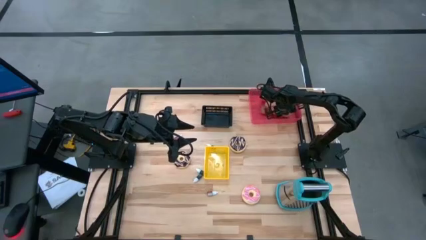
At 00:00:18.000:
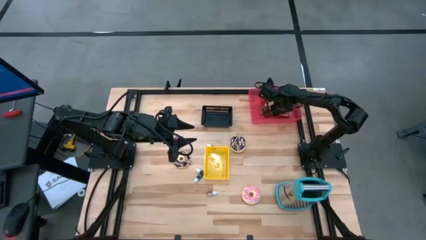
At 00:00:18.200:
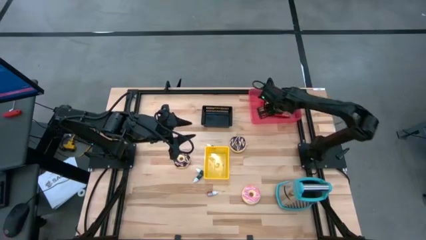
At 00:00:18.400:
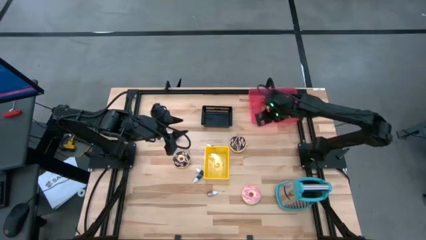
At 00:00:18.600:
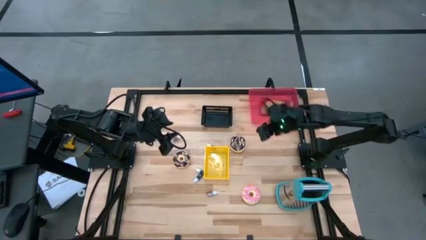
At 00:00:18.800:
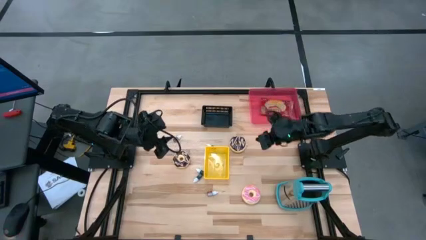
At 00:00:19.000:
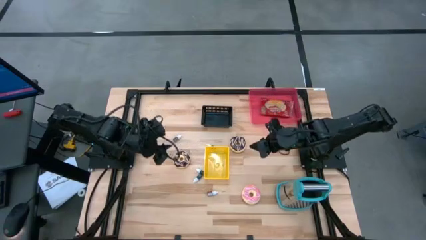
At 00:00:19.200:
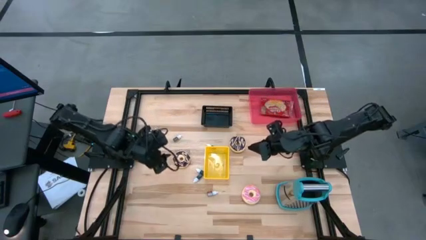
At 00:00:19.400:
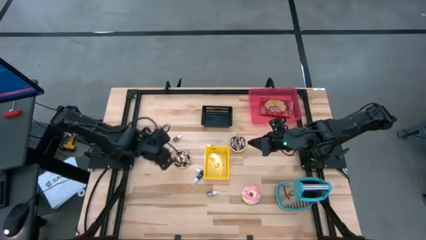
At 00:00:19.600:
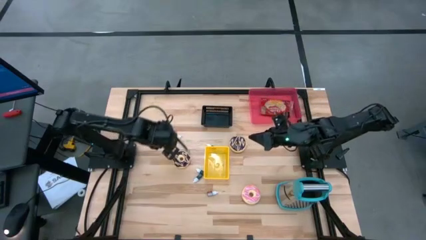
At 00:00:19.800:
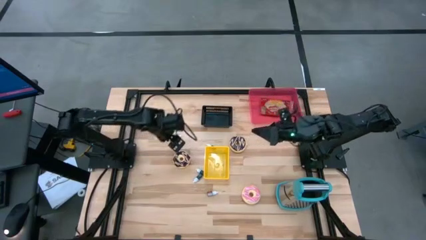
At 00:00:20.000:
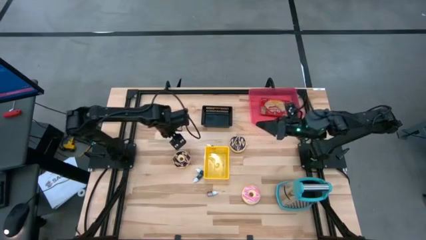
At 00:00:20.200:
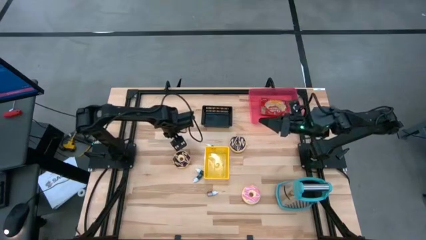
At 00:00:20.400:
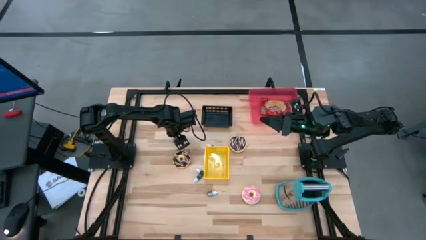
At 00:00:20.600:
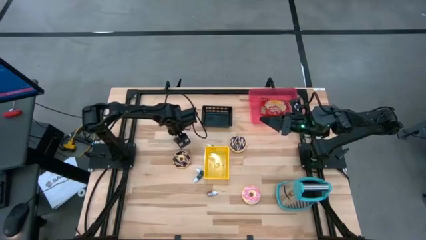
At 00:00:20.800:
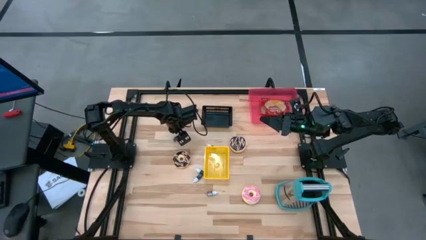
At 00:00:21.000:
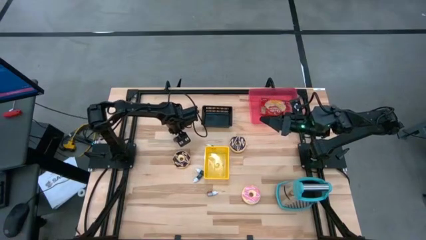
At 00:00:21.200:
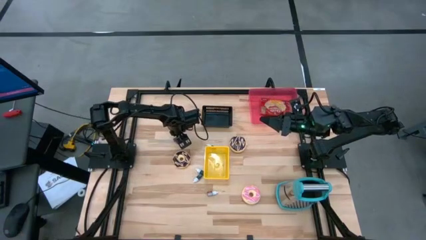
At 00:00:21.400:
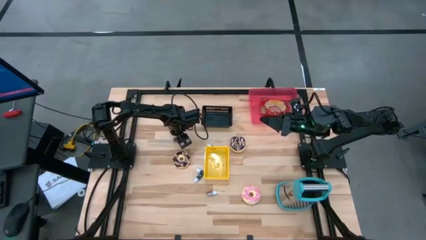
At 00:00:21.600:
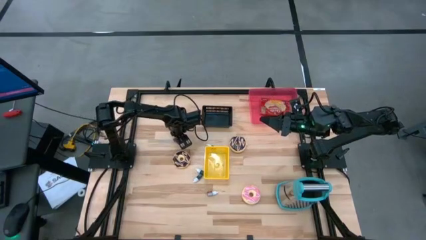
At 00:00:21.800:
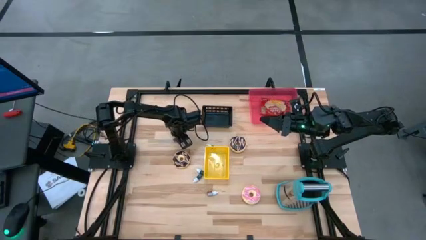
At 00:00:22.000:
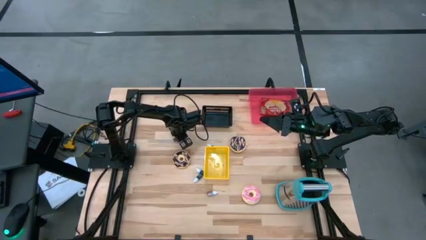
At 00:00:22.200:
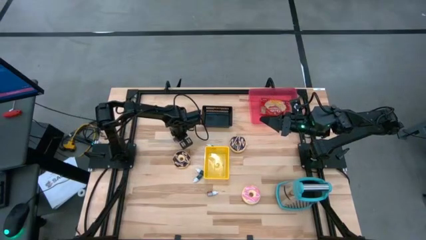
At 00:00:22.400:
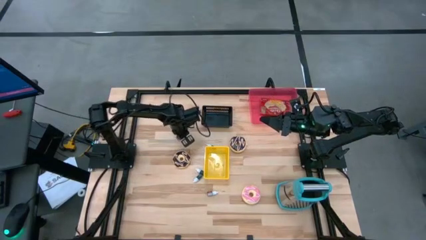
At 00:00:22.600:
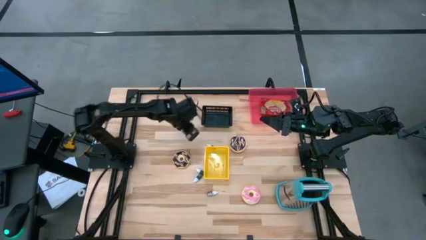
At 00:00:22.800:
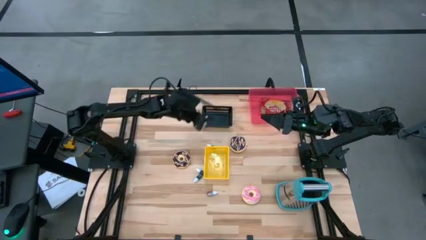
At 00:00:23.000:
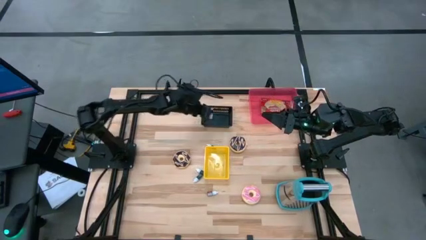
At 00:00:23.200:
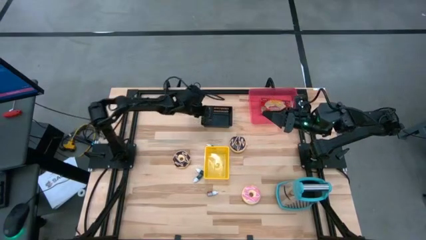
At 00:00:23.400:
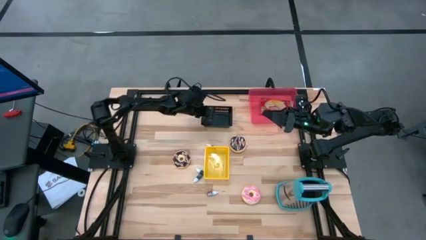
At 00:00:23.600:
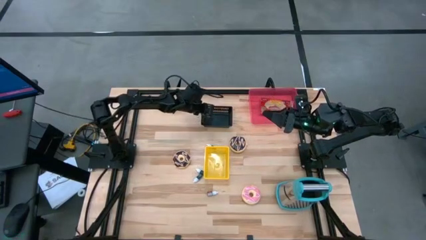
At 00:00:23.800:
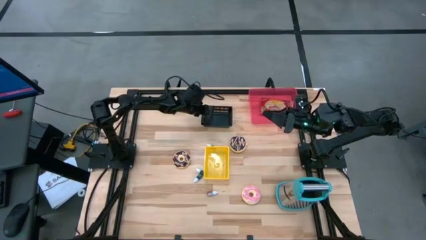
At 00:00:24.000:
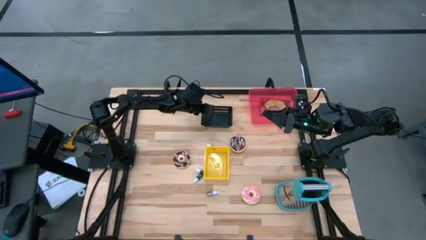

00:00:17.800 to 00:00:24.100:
Put the top red food coloring bottle into the black bin

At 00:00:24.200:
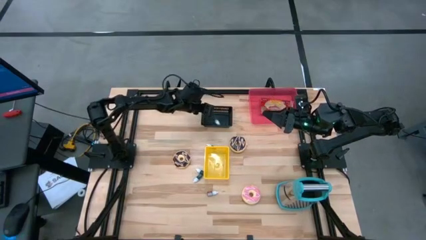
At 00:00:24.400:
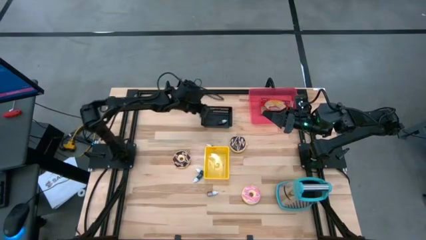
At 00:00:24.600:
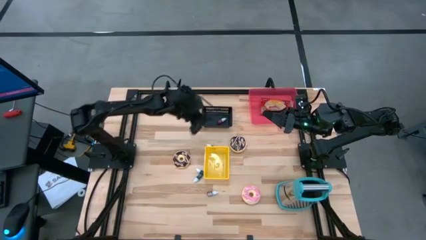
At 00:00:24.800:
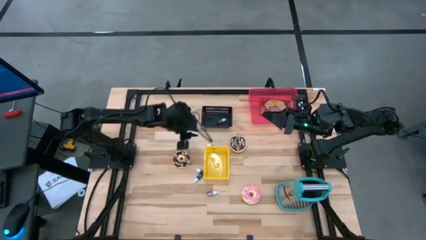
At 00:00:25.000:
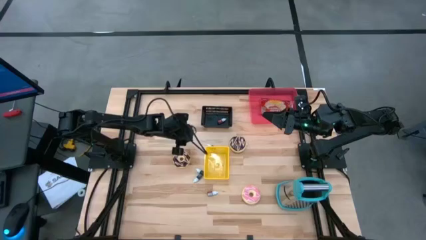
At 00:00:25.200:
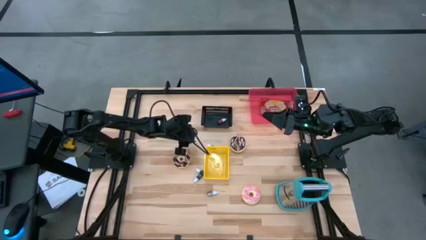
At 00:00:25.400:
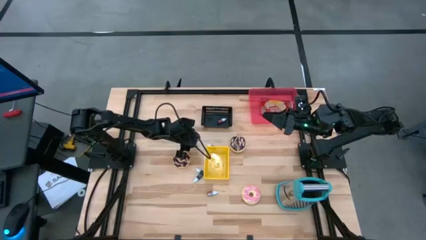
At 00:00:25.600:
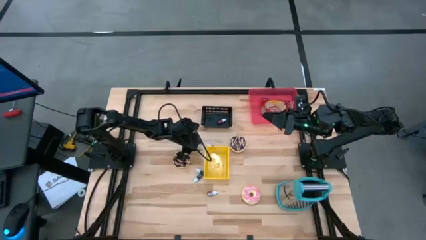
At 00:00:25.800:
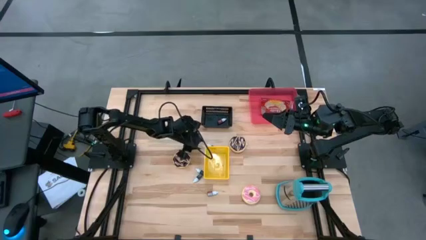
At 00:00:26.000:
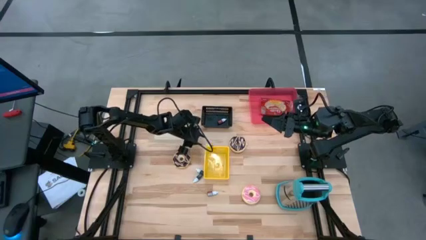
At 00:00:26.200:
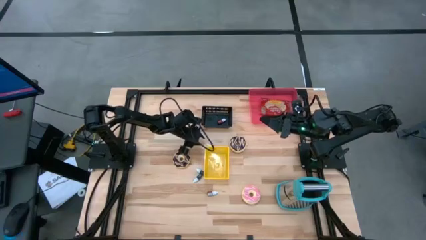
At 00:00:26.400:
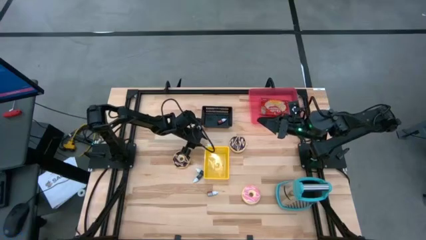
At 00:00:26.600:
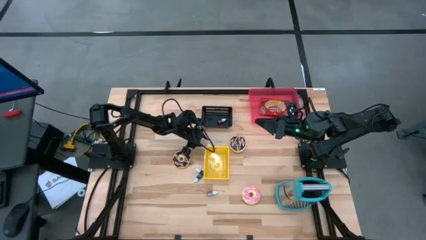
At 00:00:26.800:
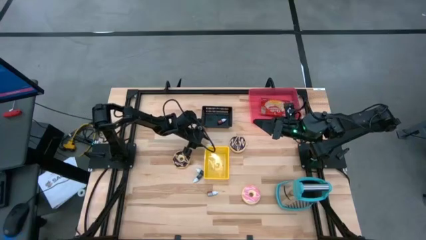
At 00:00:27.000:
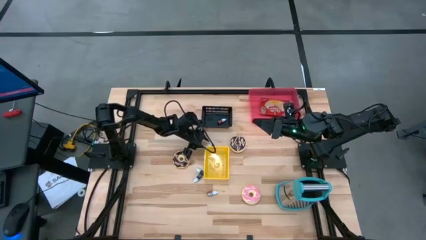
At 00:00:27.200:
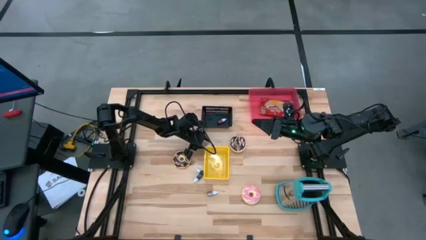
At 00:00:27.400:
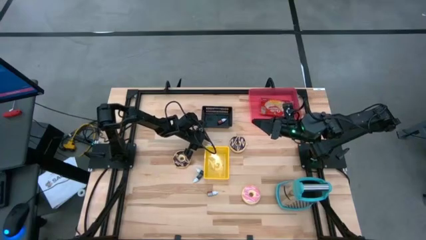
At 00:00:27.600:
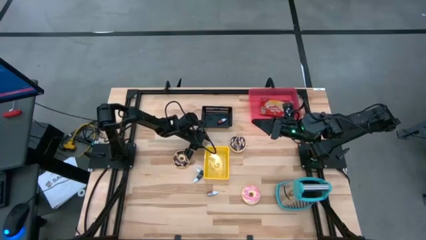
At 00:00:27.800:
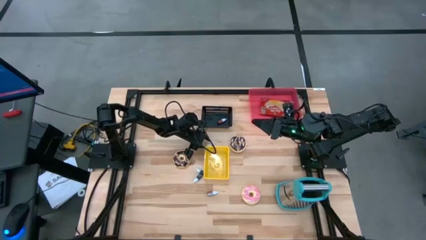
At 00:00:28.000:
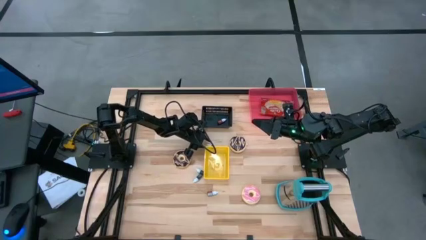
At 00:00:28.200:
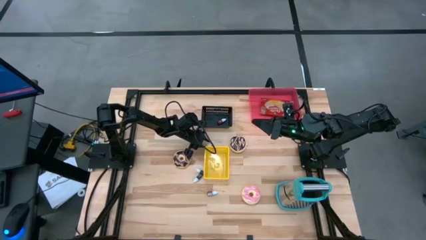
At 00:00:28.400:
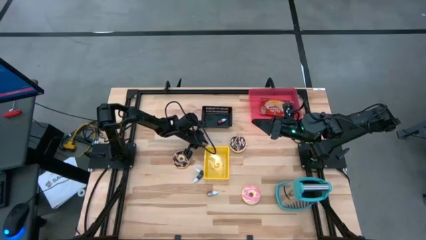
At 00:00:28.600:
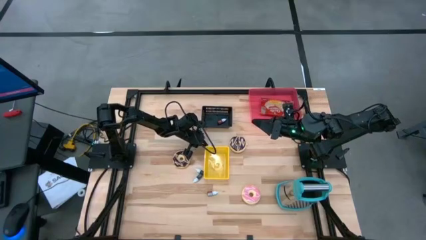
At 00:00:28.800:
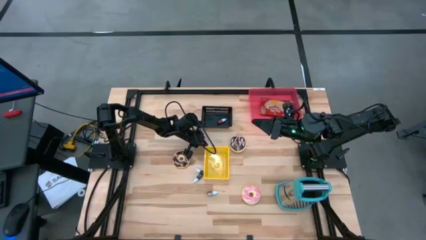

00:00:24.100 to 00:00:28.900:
Put the top green food coloring bottle into the black bin

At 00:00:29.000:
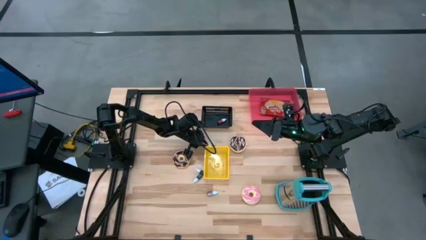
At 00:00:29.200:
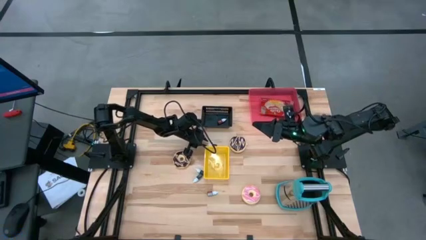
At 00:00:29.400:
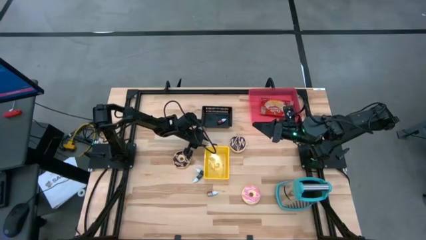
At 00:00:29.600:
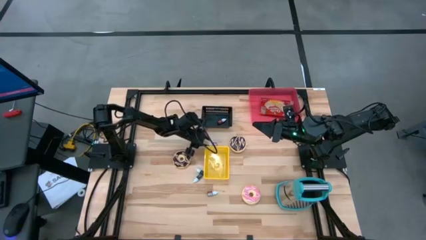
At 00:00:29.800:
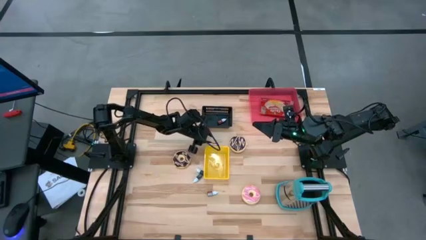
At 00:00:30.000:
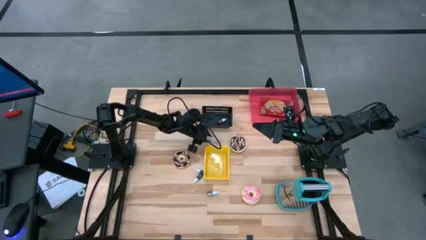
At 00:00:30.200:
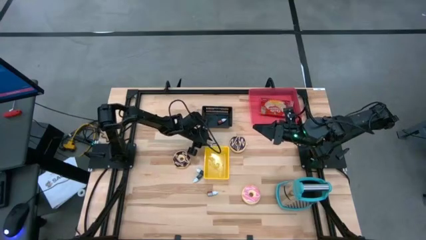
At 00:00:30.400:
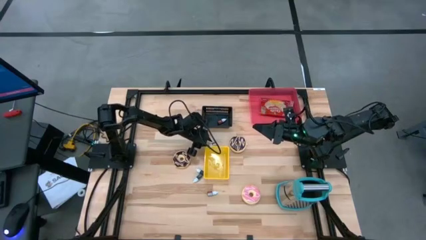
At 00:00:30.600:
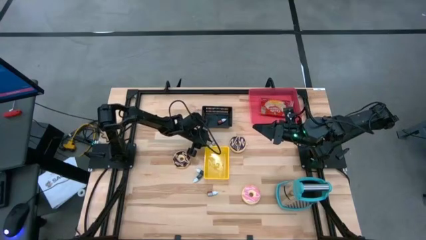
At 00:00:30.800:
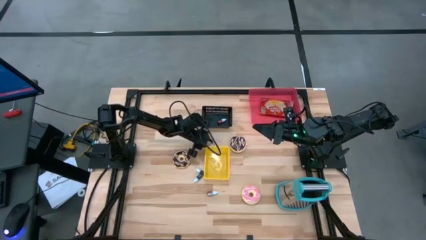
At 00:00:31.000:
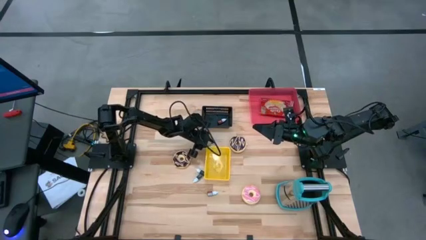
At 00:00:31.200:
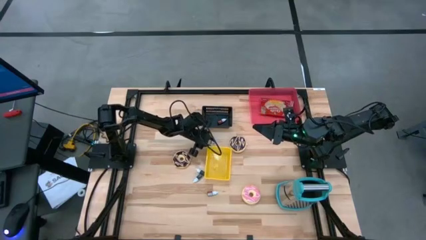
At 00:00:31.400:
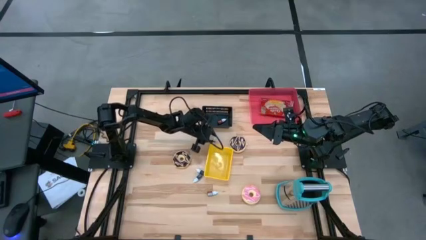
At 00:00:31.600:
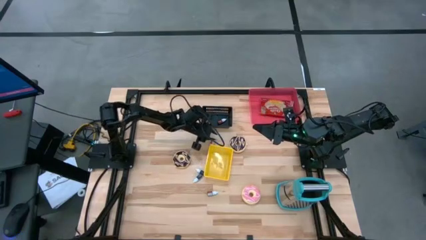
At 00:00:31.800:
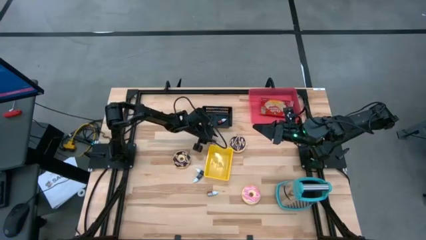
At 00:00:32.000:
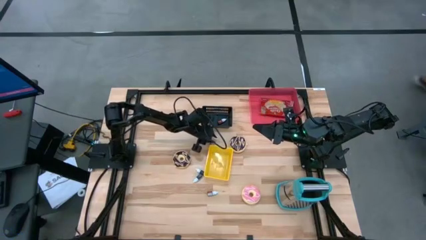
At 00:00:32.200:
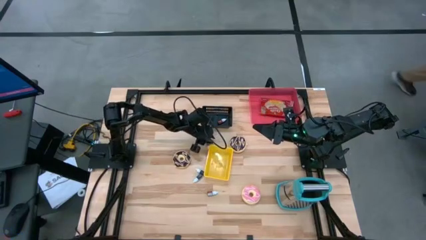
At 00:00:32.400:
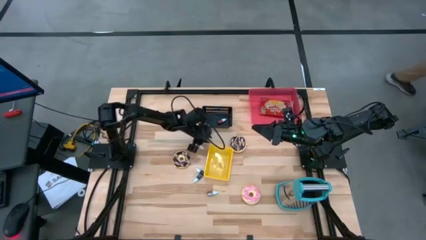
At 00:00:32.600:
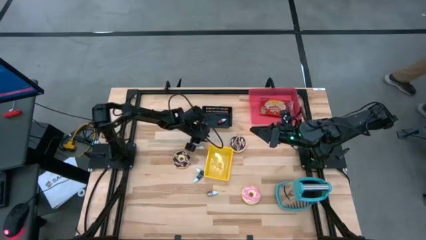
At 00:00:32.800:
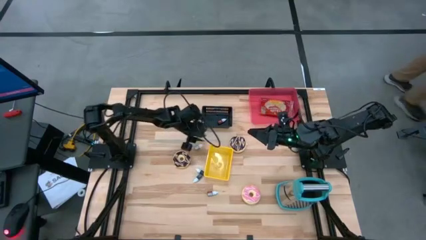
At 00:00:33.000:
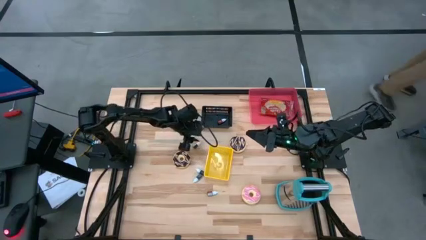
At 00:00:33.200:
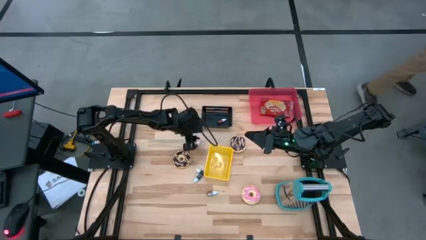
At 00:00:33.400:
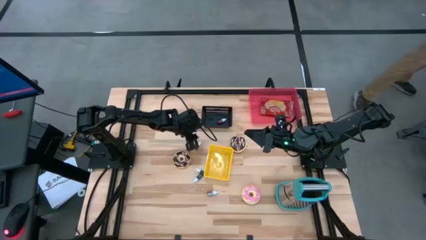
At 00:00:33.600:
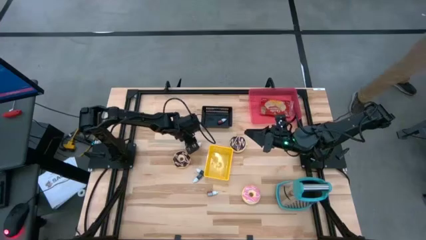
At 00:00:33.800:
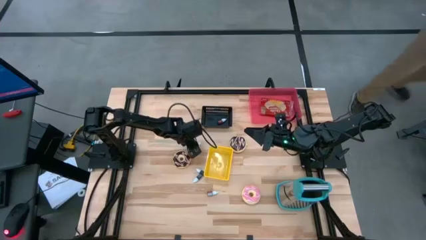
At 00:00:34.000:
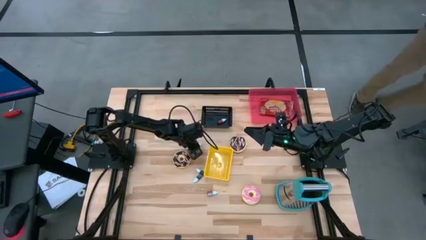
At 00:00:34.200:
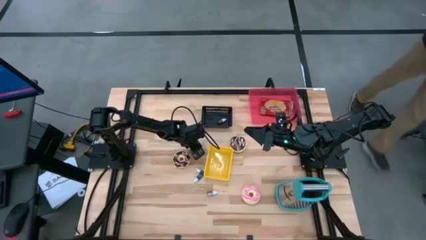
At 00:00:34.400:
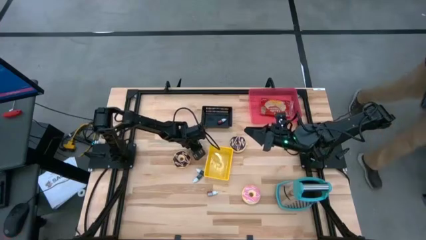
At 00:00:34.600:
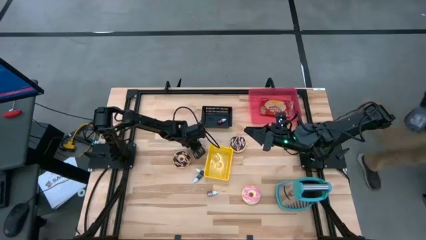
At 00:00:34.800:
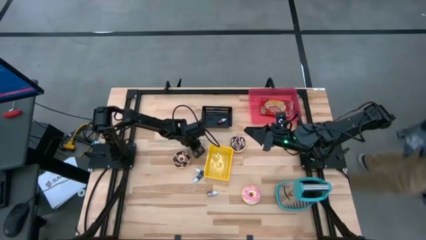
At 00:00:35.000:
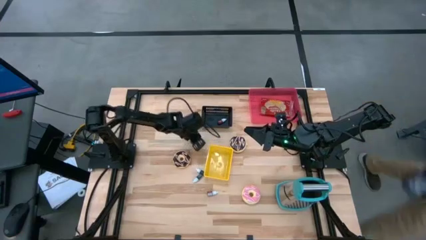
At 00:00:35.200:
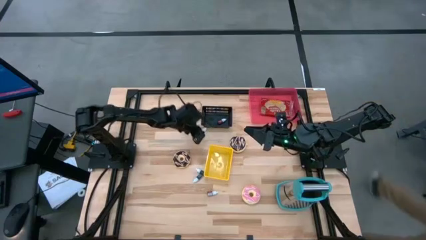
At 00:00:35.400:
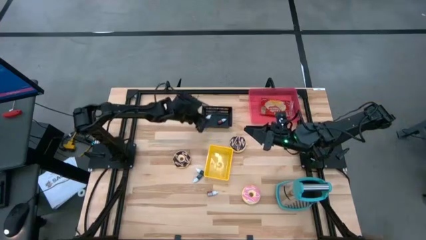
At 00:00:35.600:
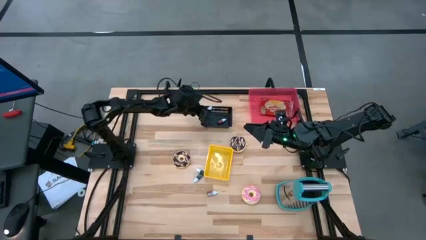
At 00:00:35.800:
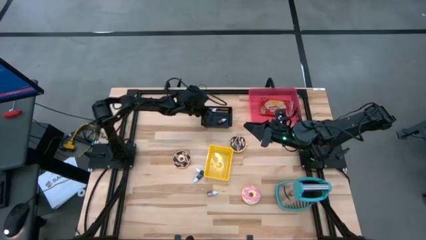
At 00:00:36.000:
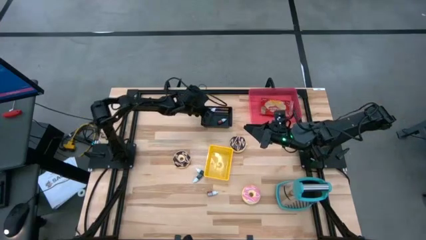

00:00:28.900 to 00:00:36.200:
Put the top green food coloring bottle into the black bin
